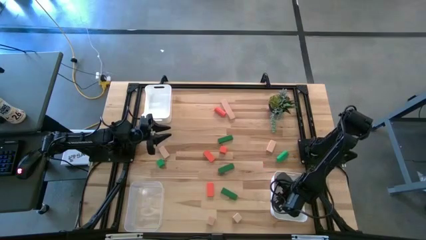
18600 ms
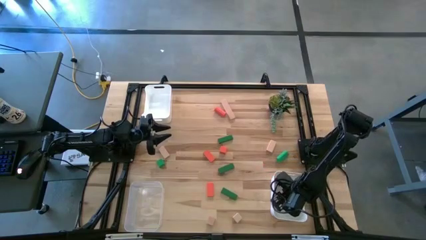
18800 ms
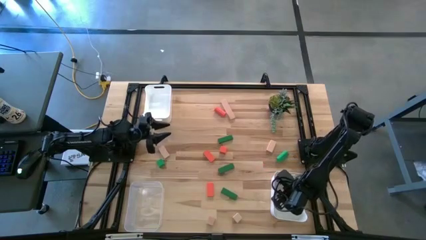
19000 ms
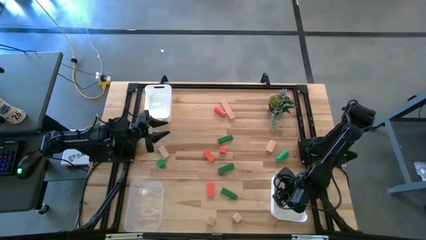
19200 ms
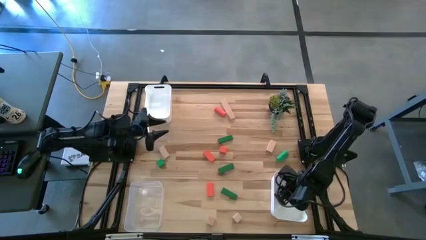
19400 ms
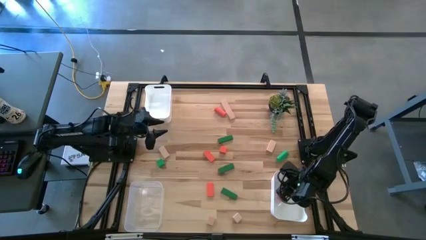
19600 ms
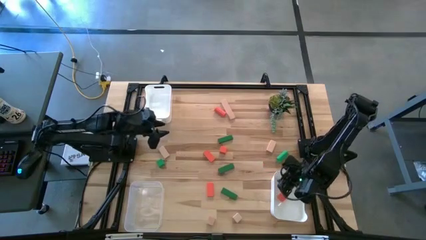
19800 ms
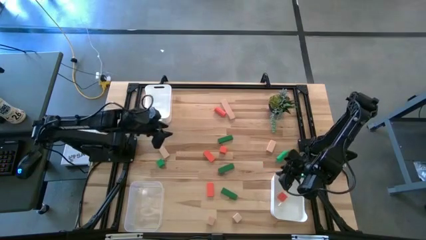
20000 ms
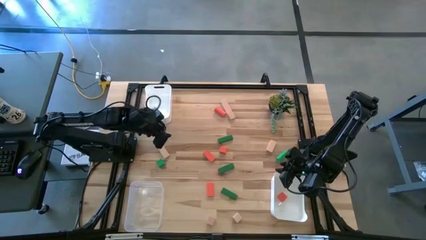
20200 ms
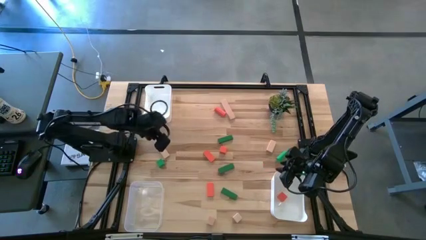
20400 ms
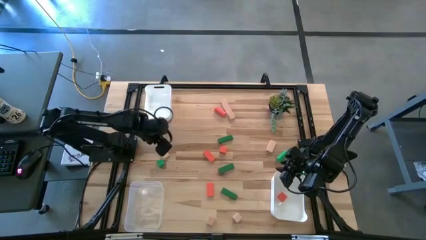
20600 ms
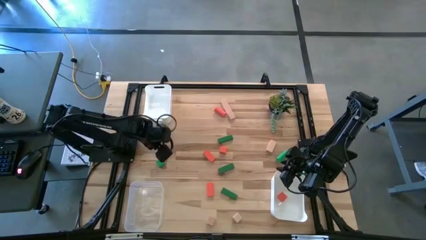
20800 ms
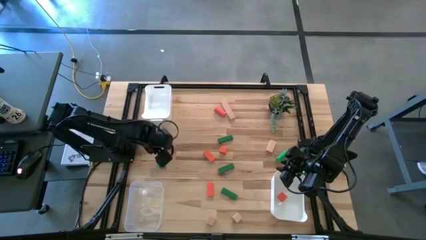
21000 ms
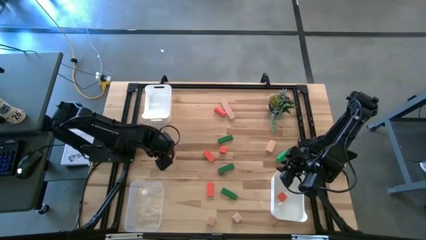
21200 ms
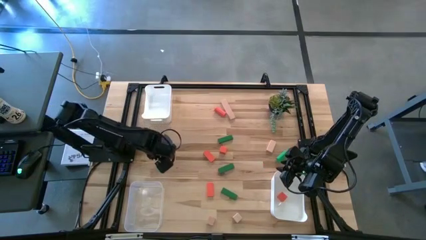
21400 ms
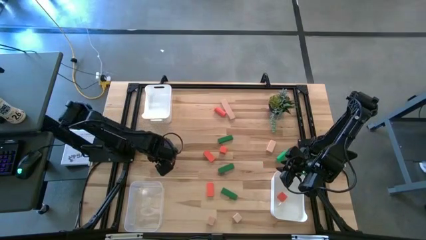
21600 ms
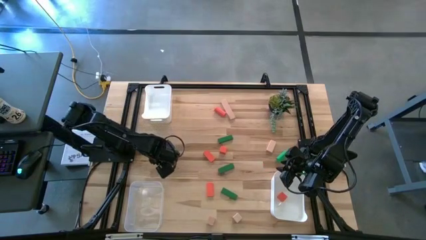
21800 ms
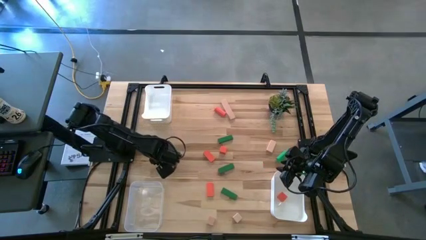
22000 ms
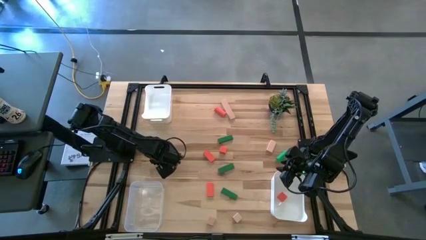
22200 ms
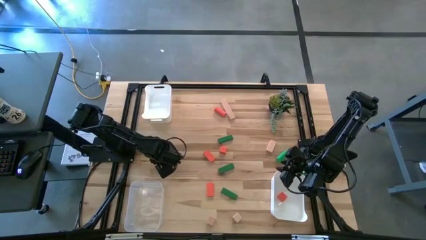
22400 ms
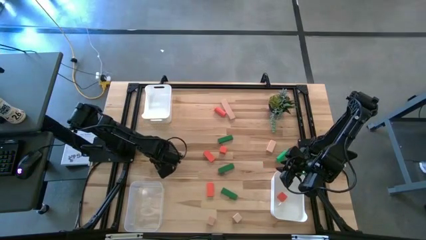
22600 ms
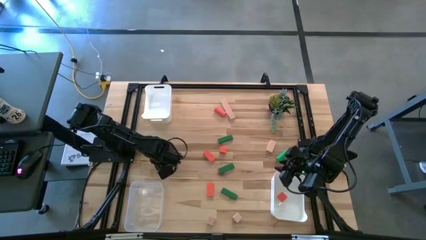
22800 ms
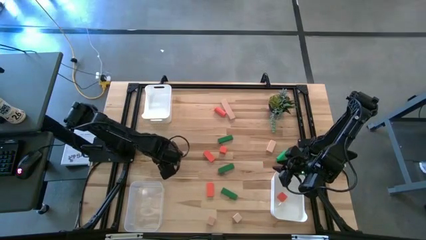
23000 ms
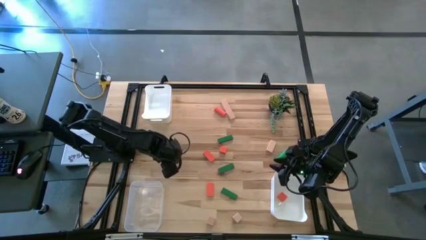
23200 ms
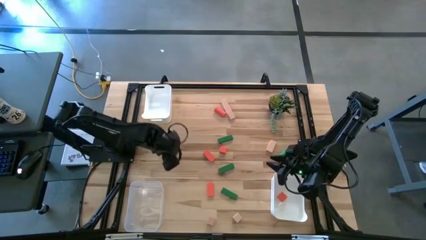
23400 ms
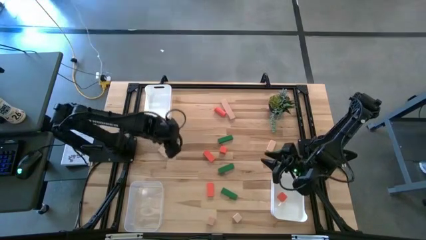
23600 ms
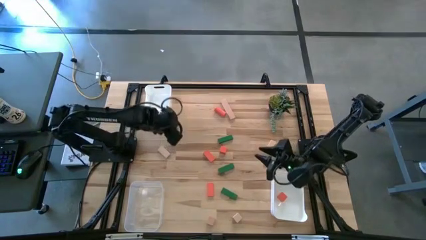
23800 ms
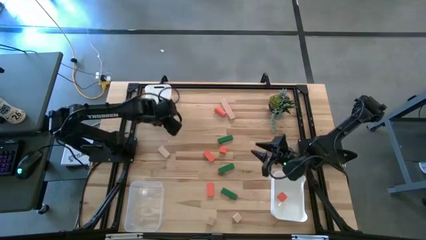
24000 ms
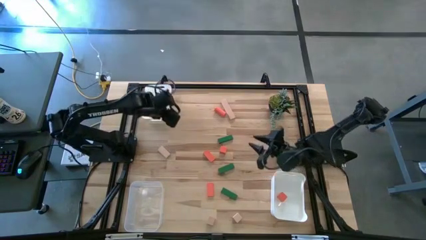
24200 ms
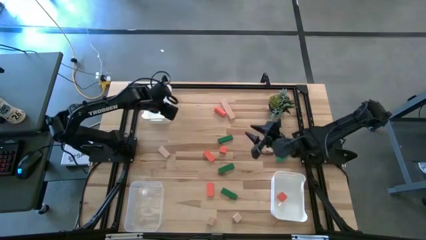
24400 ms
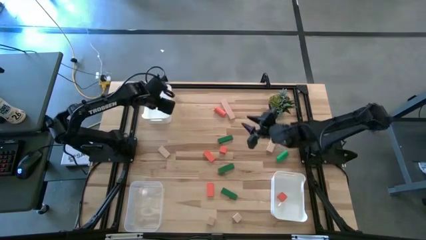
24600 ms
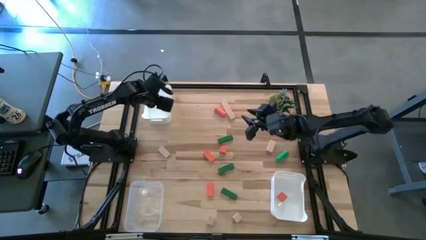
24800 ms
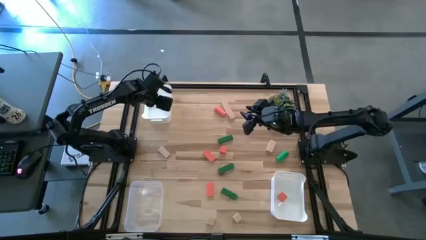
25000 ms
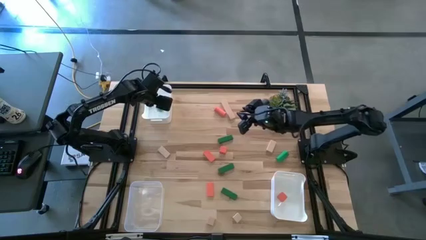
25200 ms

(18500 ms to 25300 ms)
Task: Sort & place blocks by color
Put the green block into the top white bin

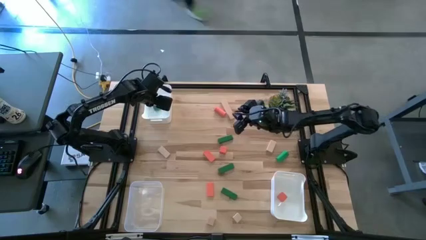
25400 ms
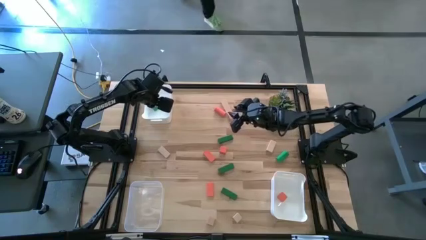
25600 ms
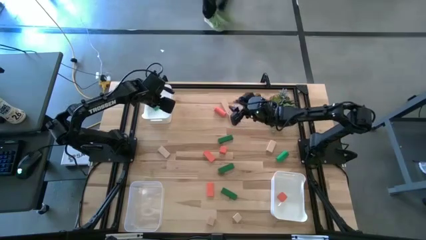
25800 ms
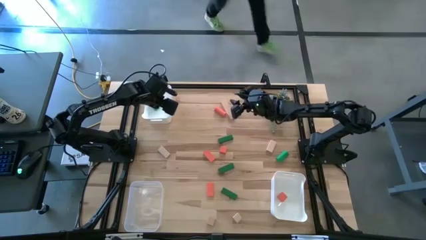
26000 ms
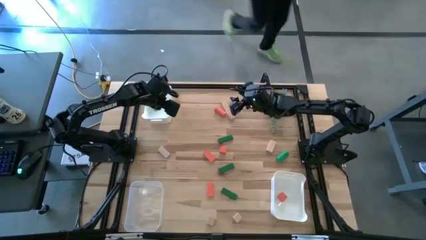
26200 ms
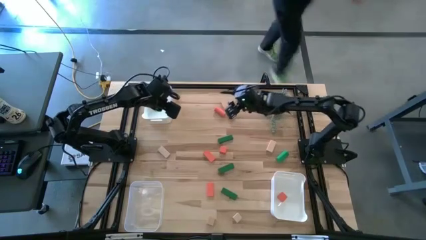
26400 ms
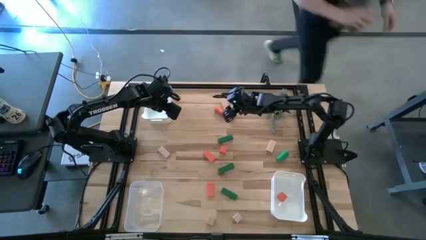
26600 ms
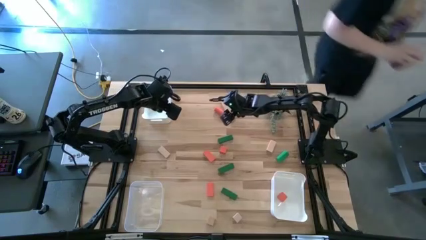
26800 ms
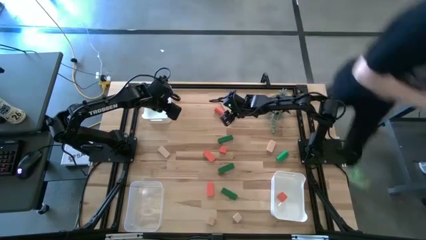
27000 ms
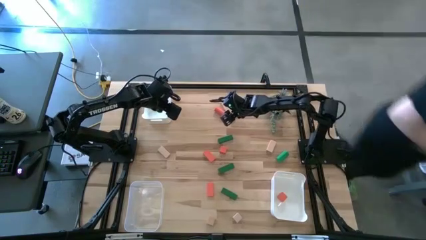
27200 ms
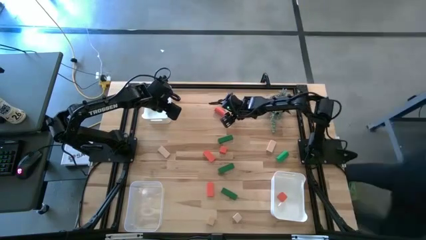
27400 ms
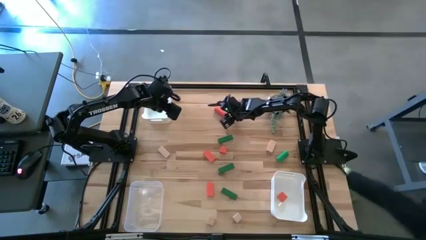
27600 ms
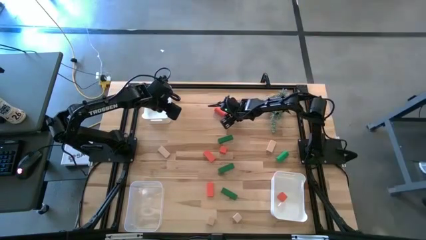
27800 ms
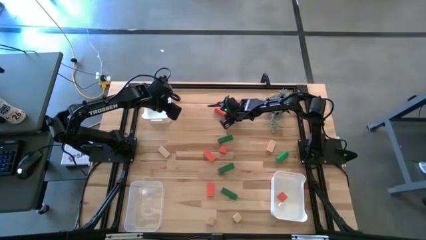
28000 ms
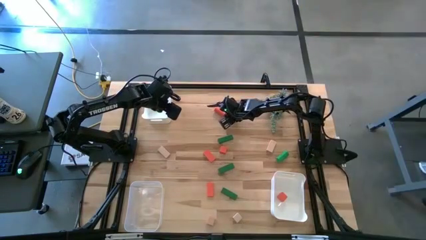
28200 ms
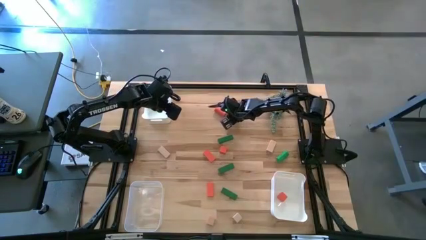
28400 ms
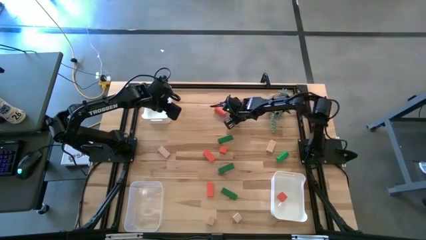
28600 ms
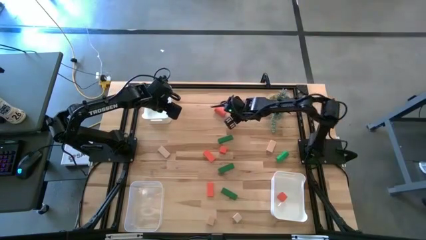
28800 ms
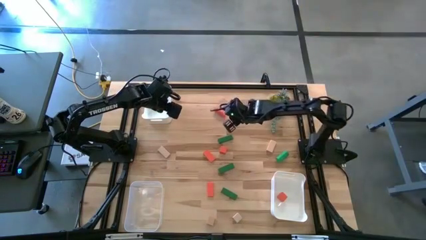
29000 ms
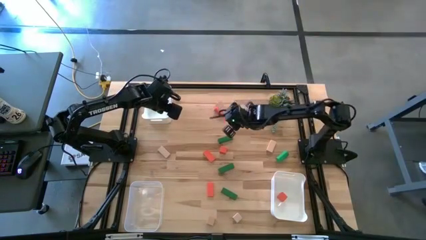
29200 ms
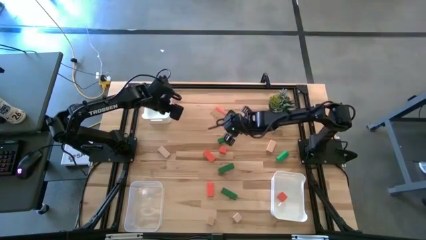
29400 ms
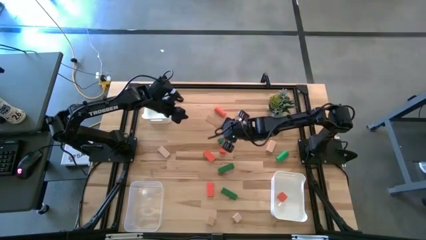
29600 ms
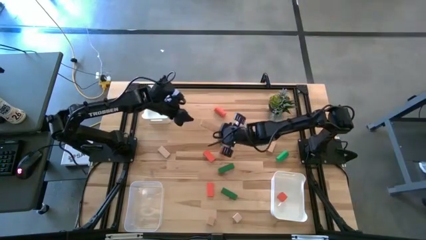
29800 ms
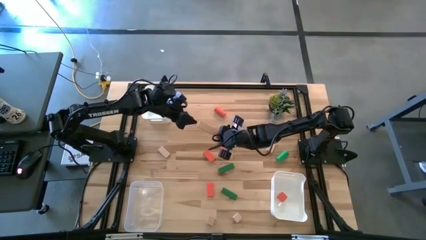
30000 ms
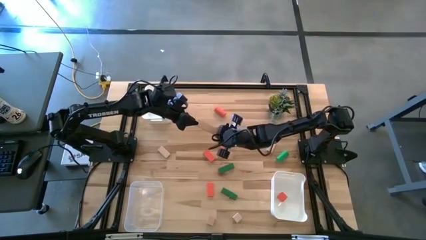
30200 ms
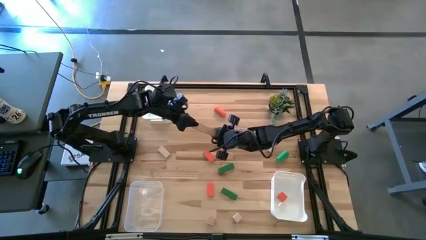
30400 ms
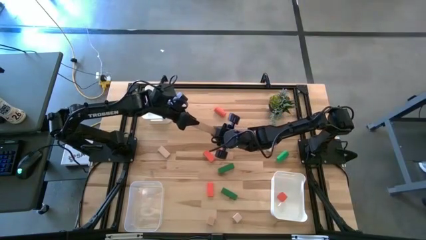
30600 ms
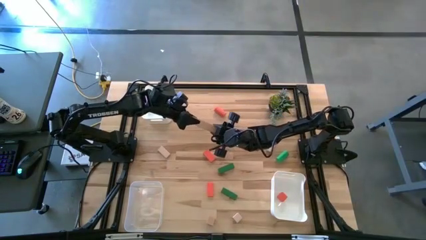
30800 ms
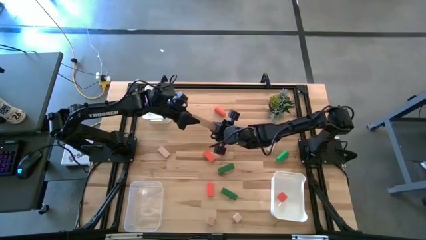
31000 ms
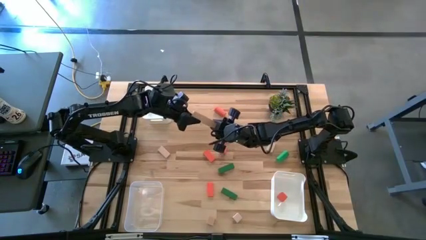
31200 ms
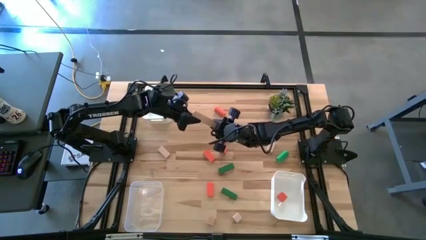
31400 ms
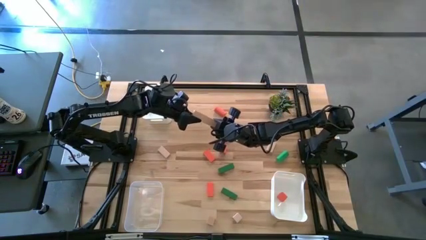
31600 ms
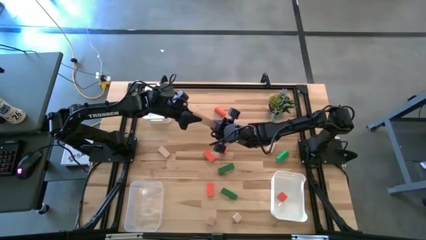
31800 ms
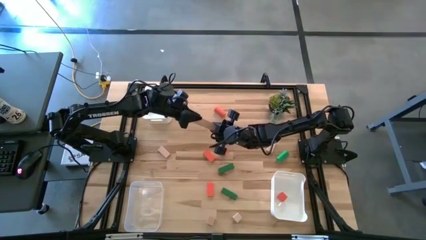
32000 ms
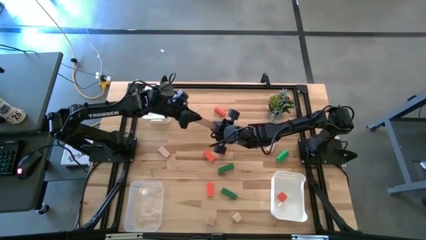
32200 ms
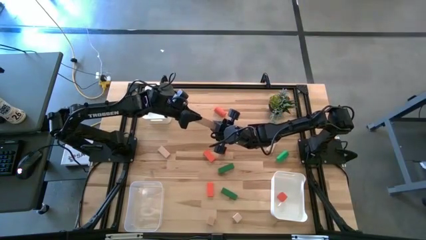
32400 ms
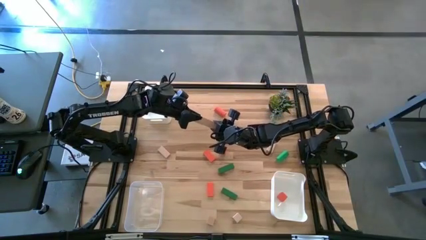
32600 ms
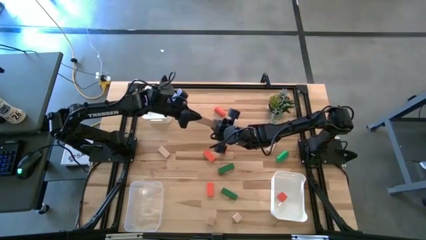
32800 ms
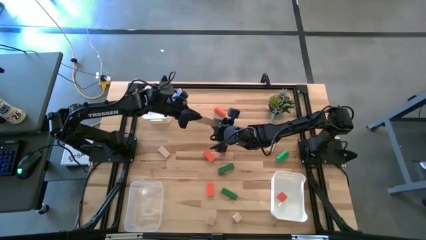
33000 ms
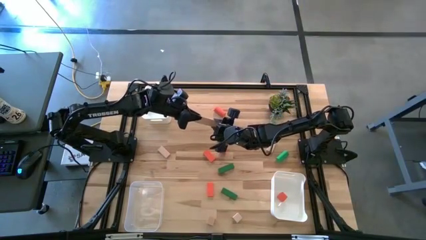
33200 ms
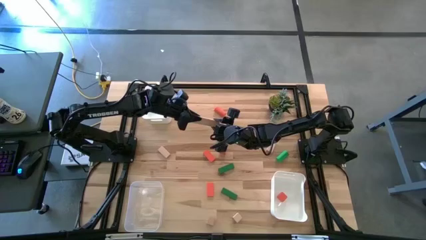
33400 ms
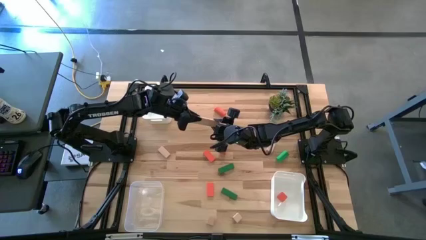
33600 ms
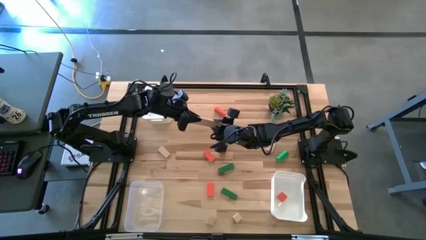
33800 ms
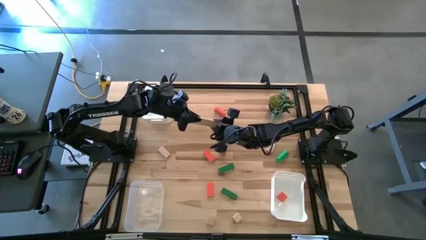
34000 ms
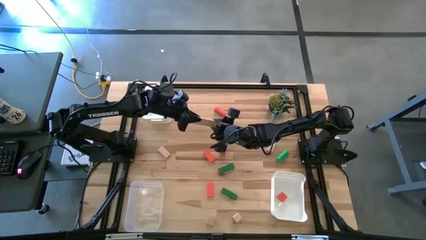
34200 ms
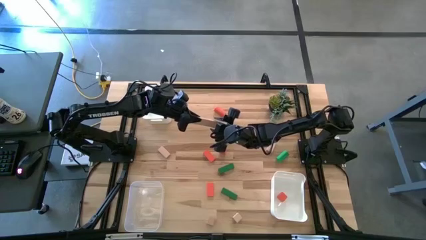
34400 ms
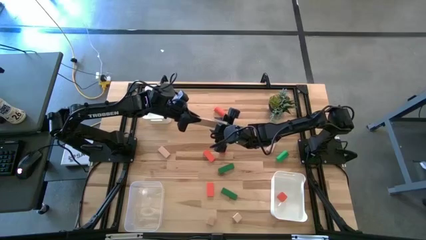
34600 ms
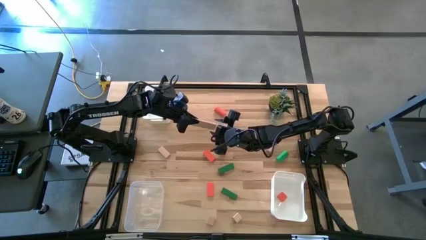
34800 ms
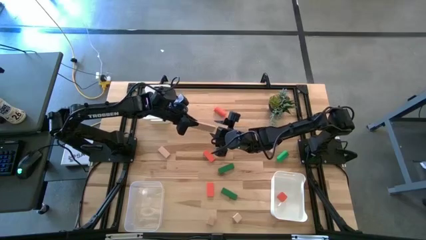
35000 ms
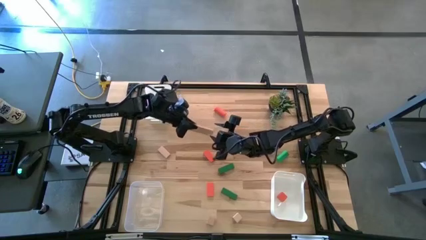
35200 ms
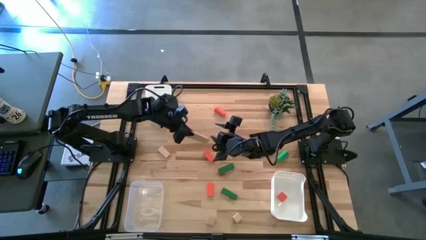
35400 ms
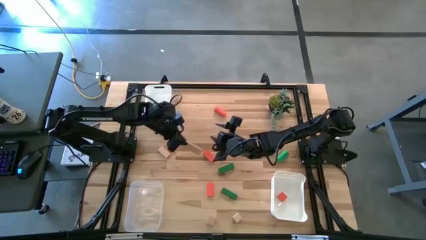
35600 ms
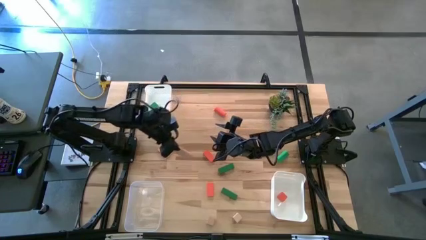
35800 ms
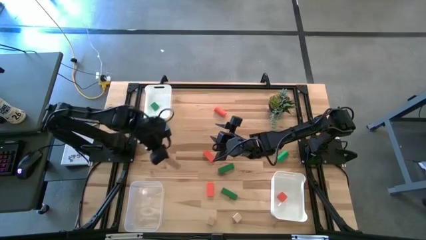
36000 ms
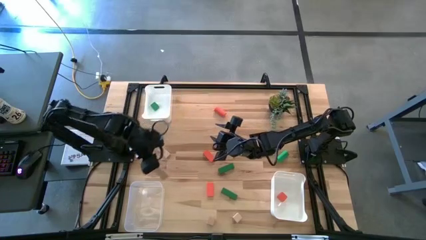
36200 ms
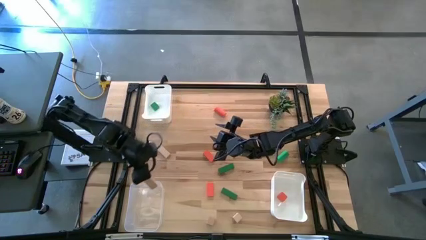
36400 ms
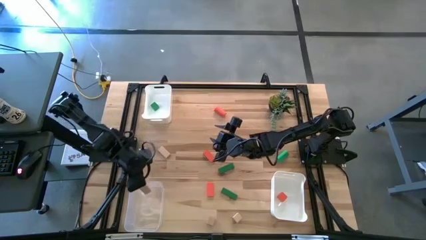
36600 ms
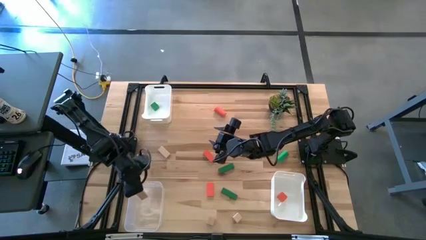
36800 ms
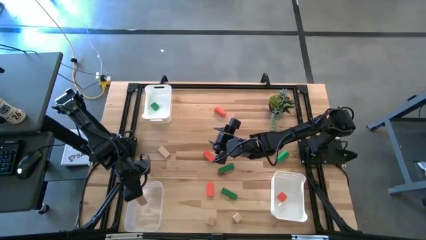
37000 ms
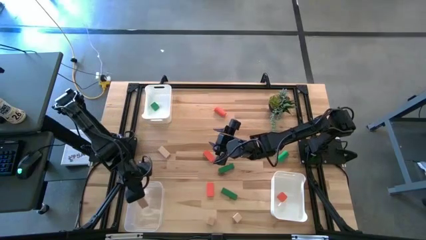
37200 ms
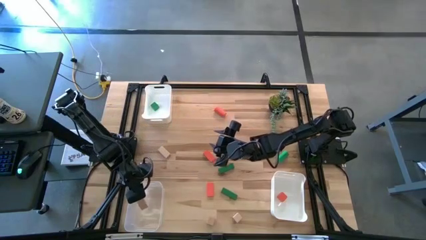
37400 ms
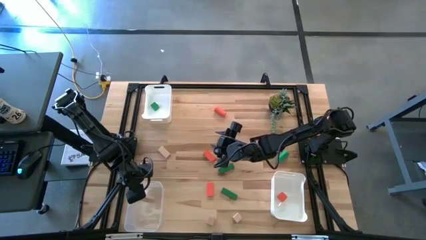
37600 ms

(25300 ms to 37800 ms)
Put the brown block into the transparent bin
